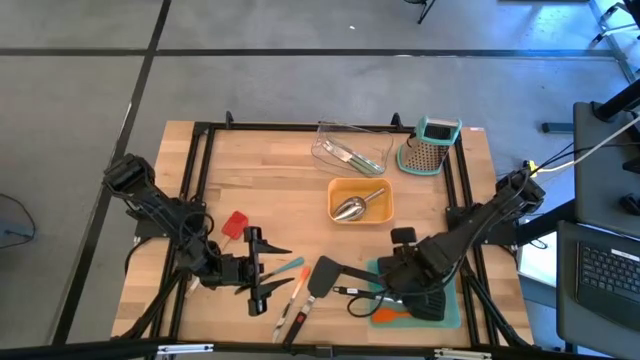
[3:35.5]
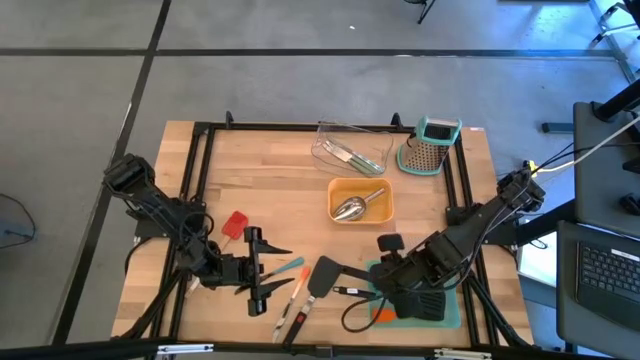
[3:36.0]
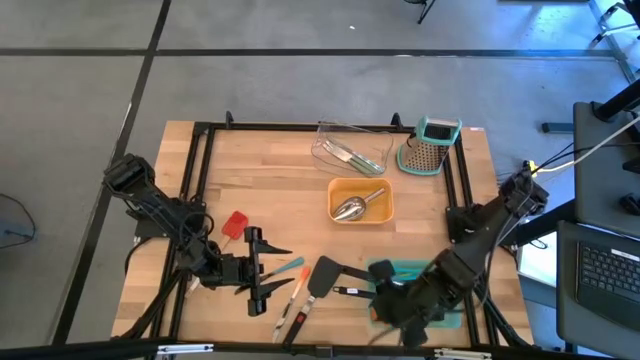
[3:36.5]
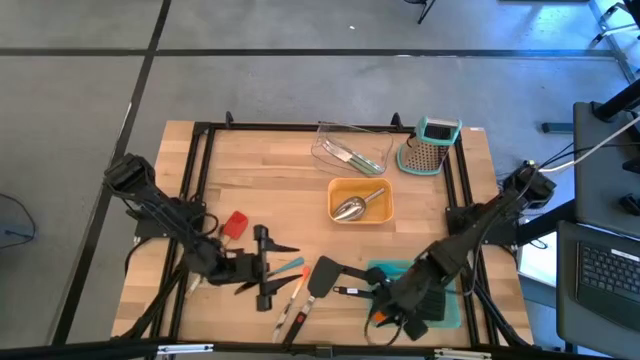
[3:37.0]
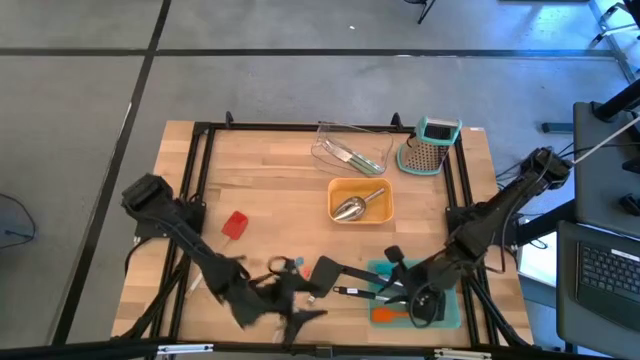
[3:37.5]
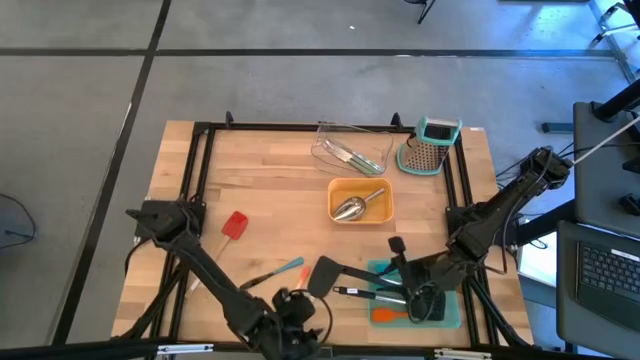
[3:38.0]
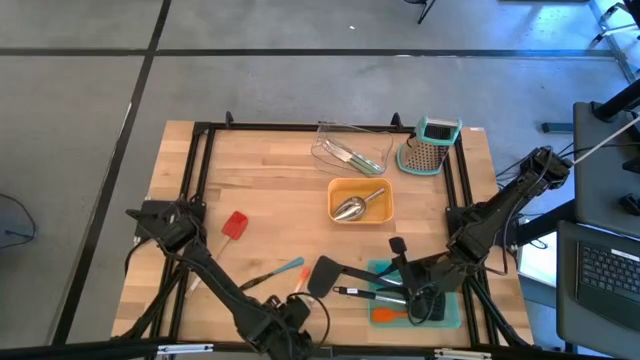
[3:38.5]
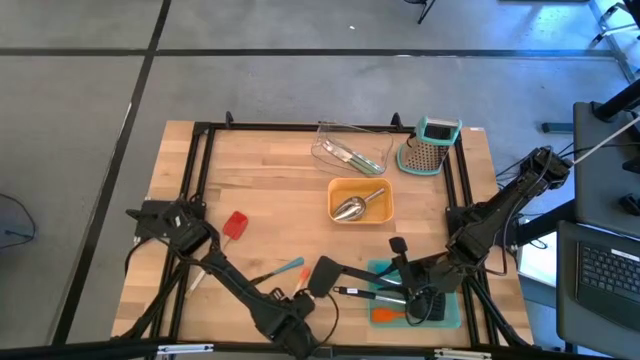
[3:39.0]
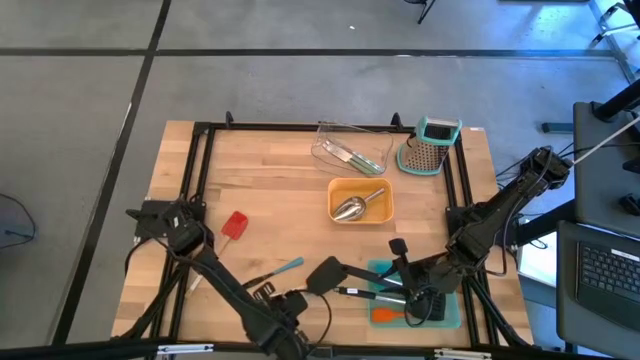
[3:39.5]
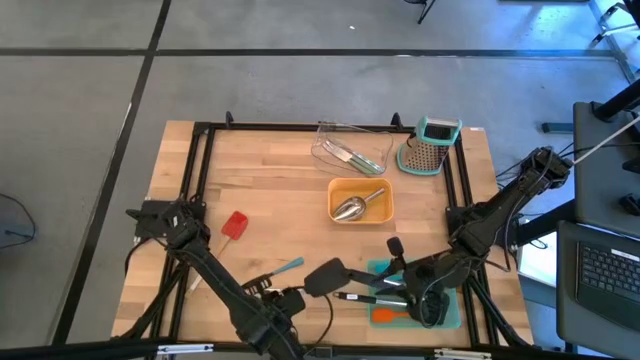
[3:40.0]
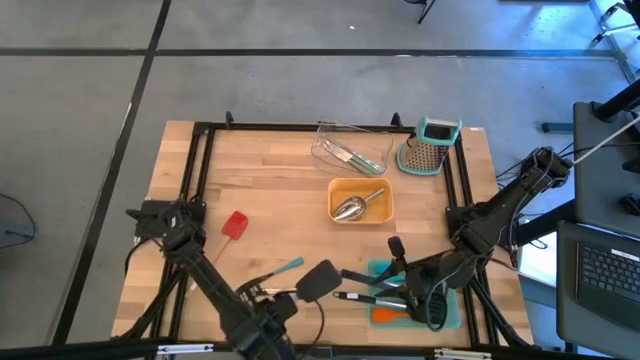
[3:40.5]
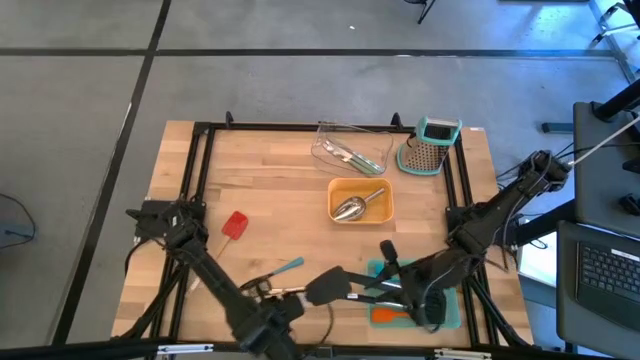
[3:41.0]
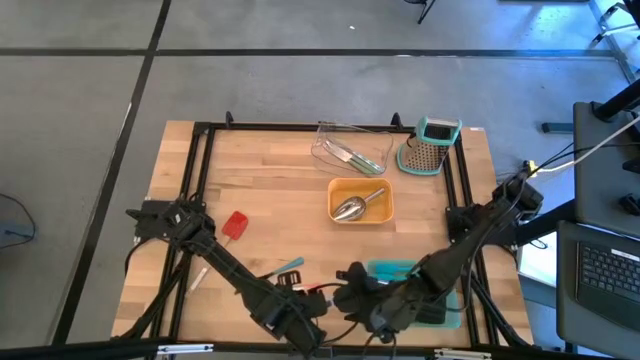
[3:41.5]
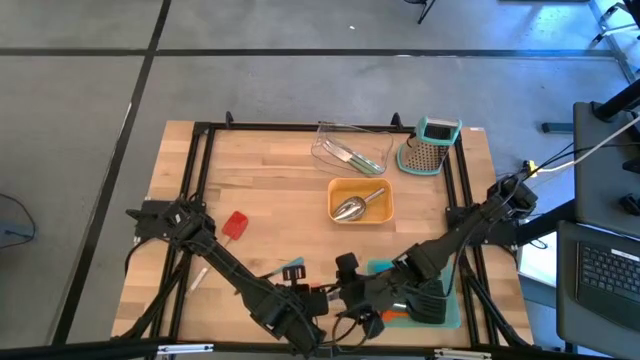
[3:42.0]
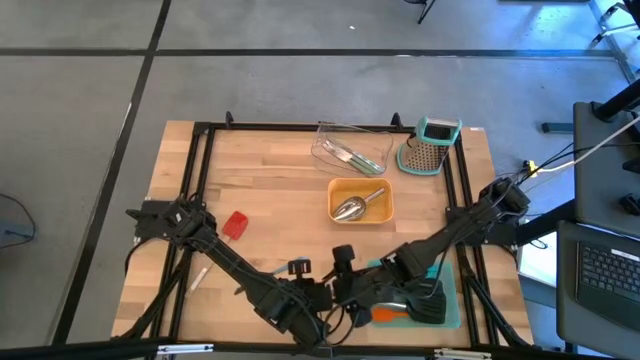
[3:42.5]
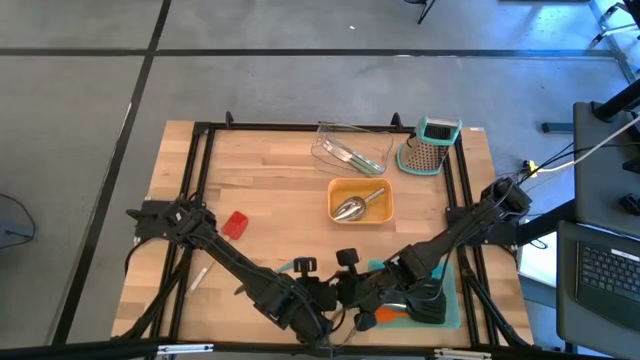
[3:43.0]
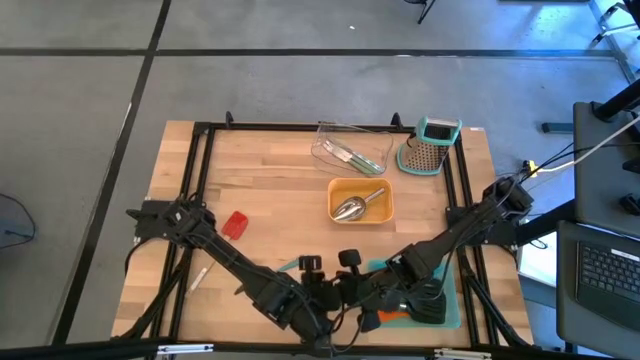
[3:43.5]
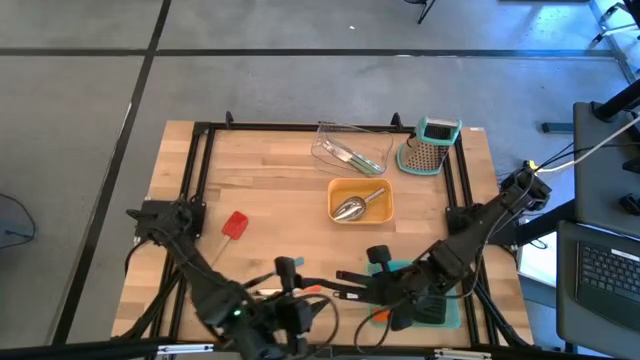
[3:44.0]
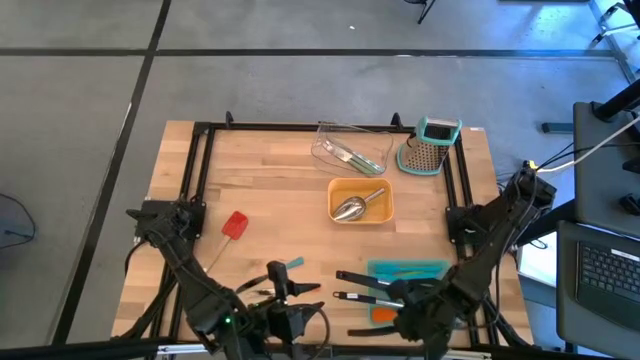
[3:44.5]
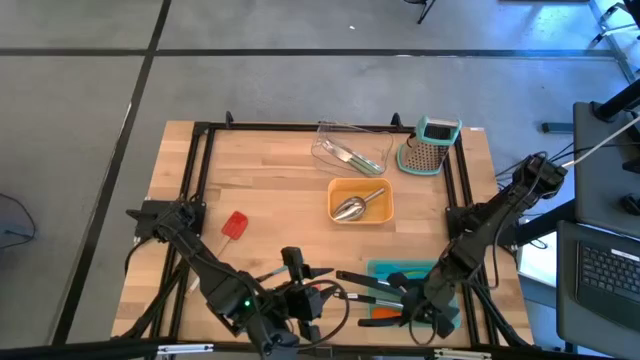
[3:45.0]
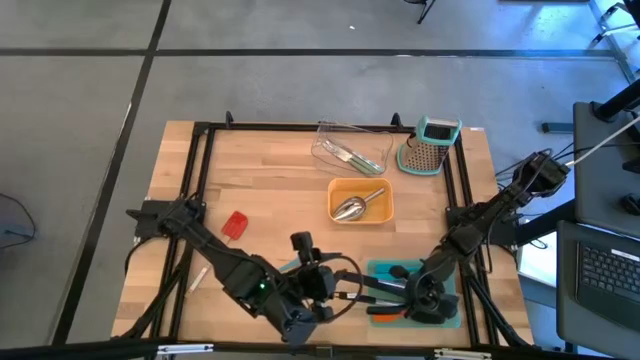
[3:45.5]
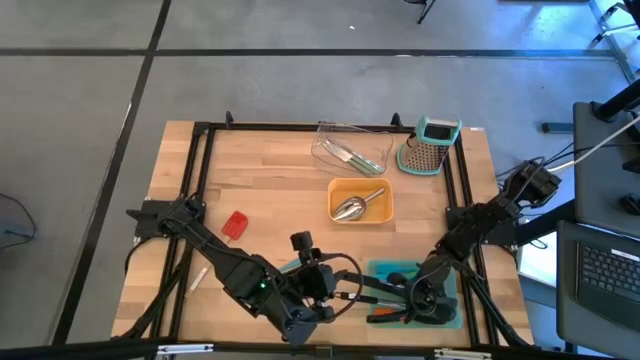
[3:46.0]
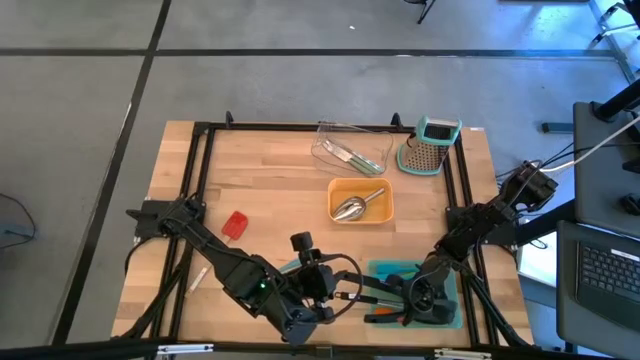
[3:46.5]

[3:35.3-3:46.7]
Task: Pick & Place Kitchen Items
Put the black silver spatula into the green bin

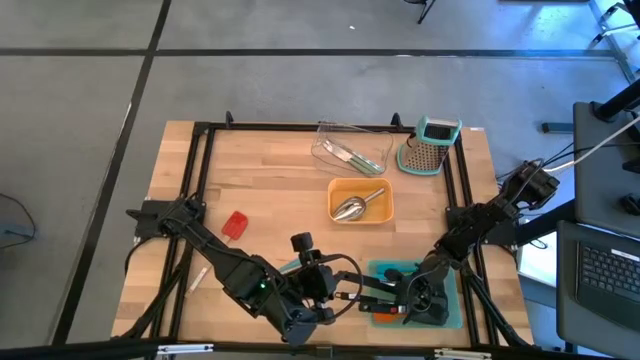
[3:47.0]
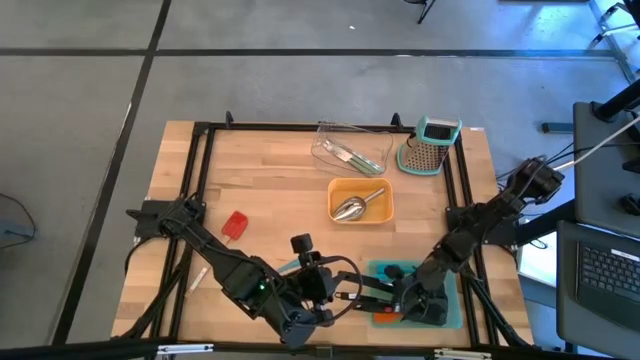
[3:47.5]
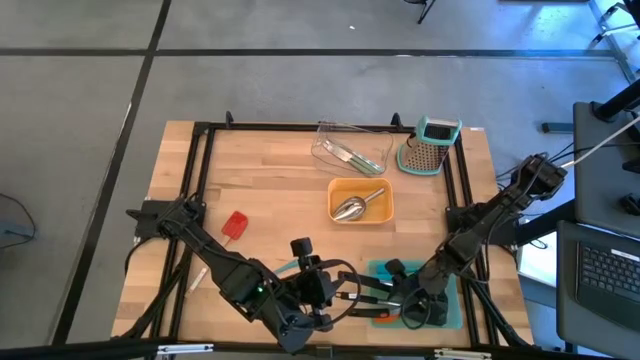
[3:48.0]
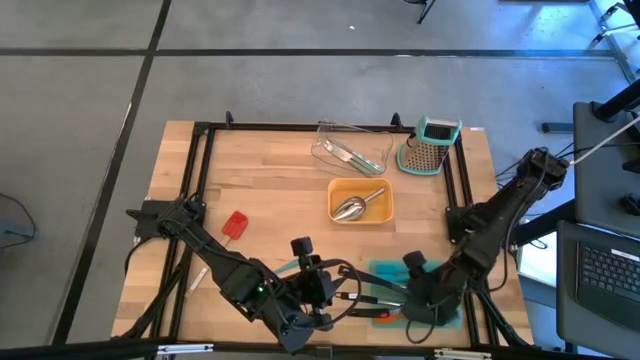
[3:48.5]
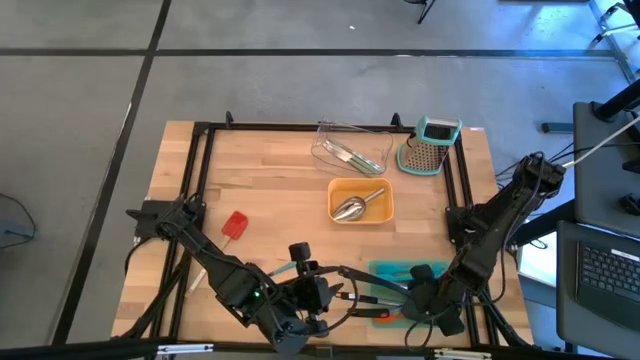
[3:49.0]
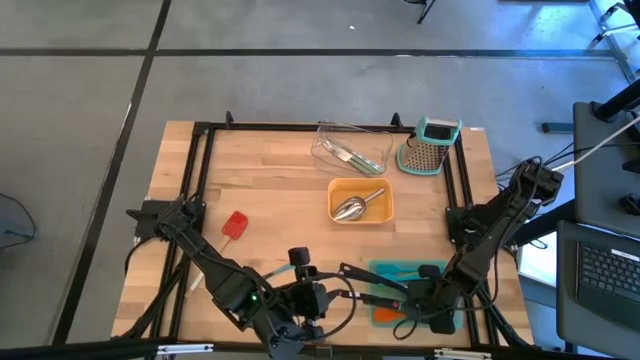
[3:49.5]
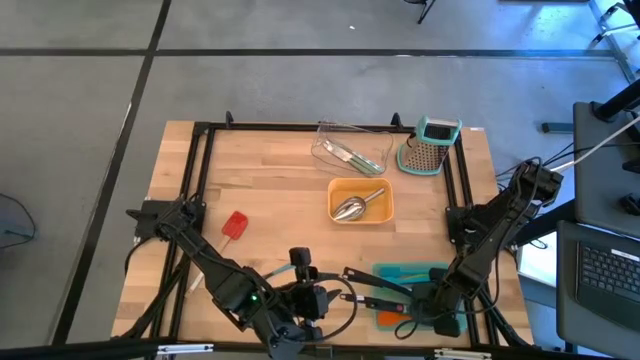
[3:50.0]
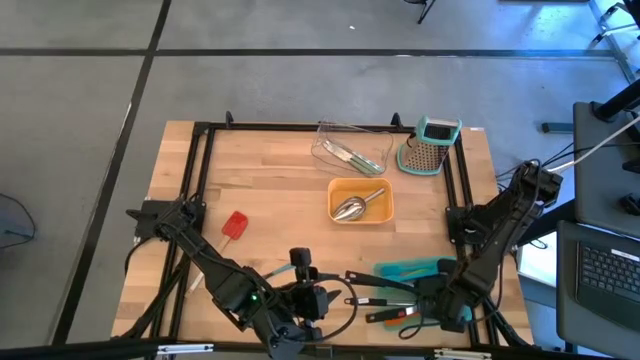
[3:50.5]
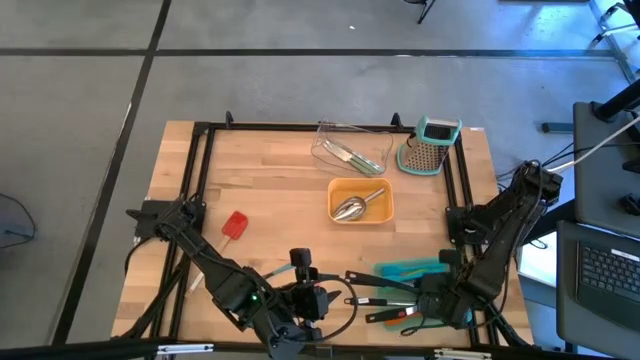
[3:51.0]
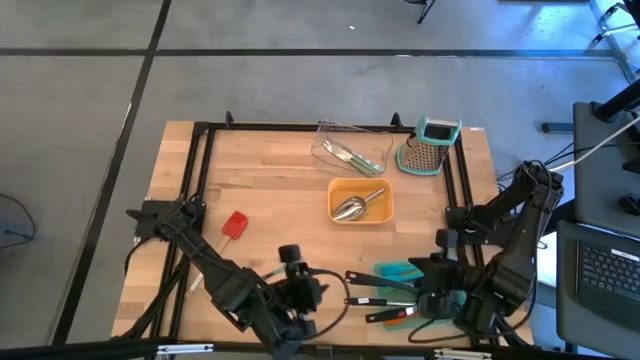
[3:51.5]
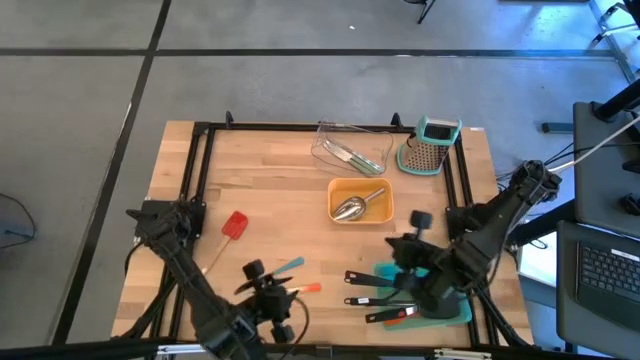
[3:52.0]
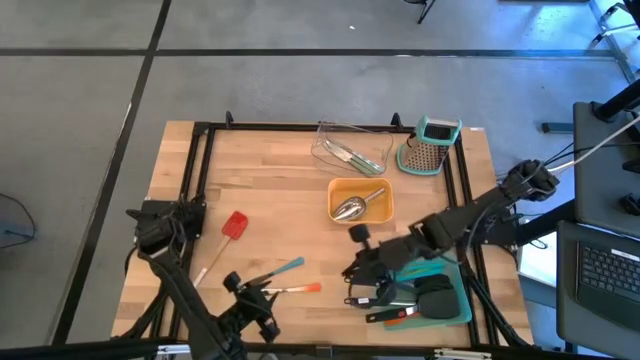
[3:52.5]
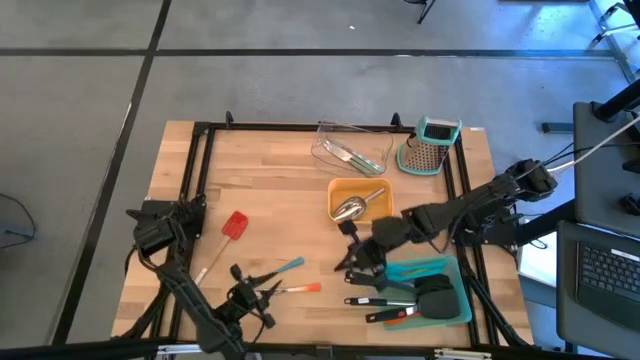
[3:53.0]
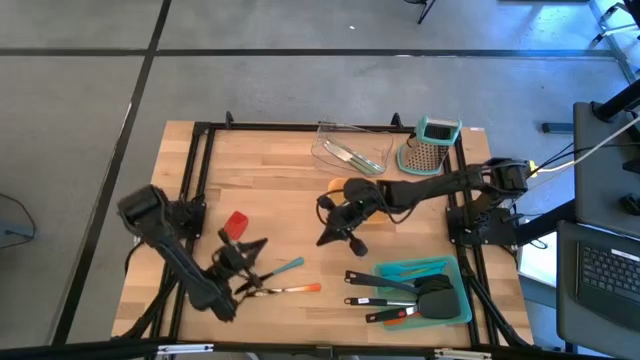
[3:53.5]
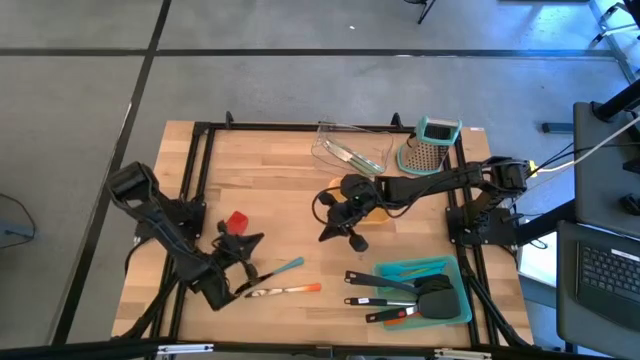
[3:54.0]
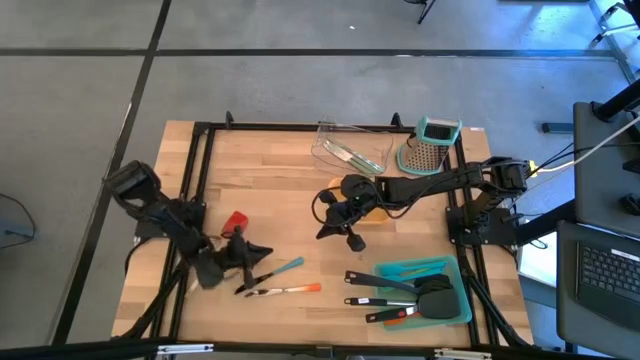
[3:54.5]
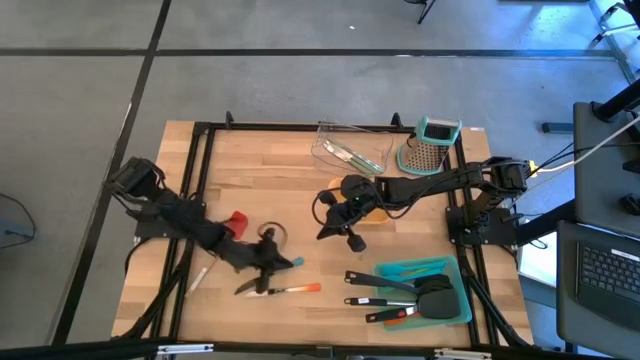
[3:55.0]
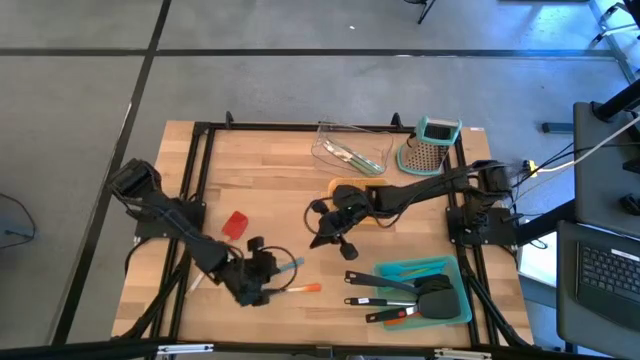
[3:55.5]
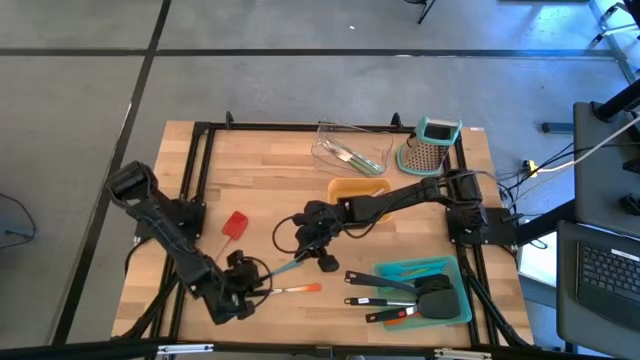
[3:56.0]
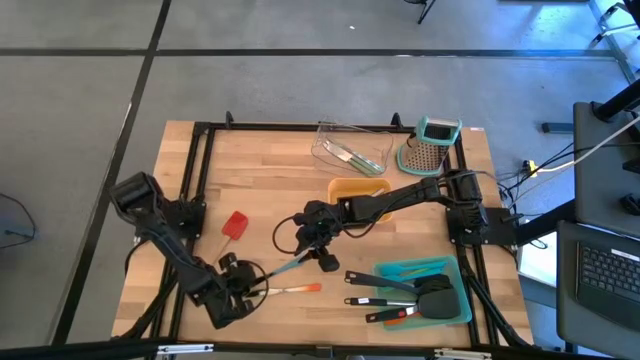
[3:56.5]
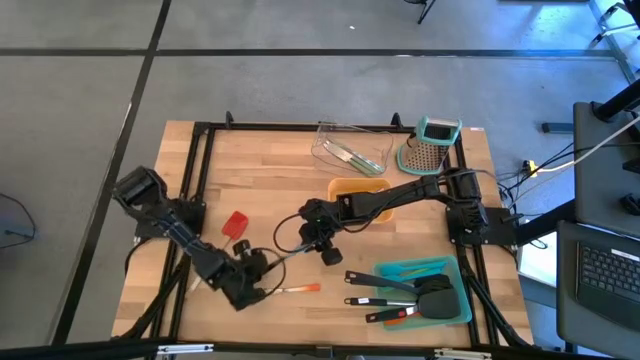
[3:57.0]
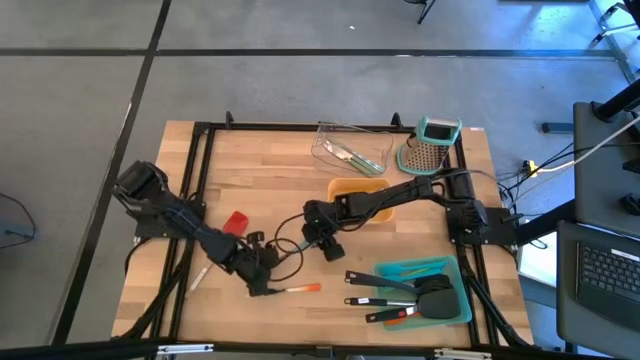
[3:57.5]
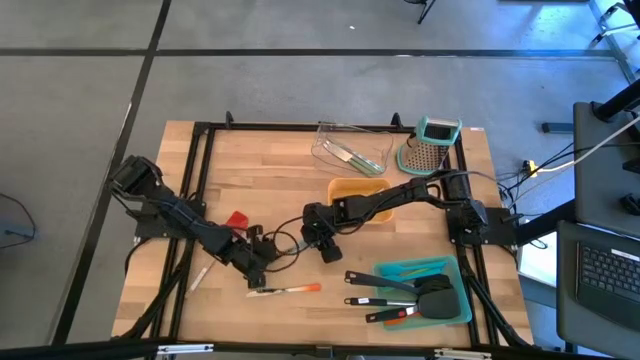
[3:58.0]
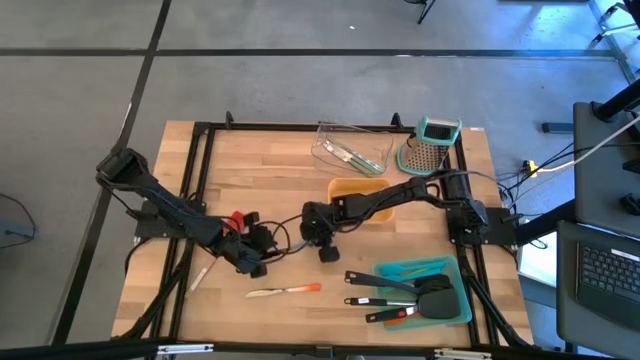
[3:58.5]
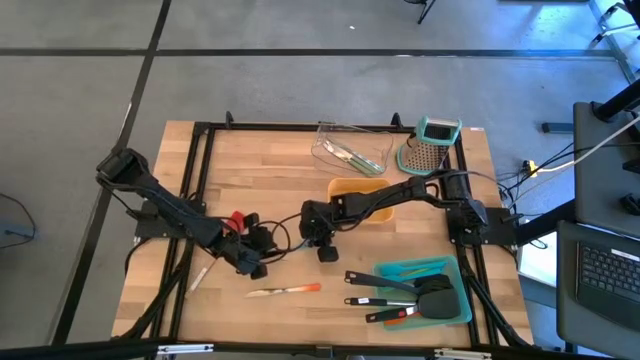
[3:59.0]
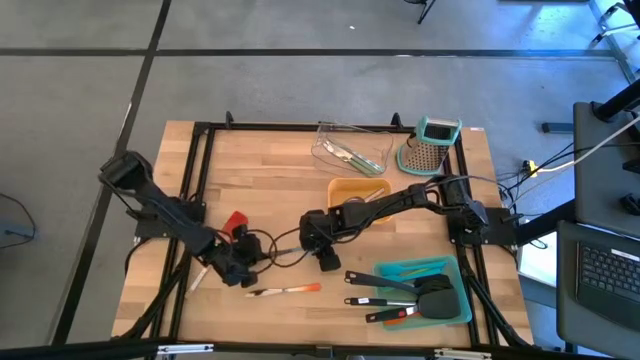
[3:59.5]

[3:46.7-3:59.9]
Put the blue knife into the transparent bin
